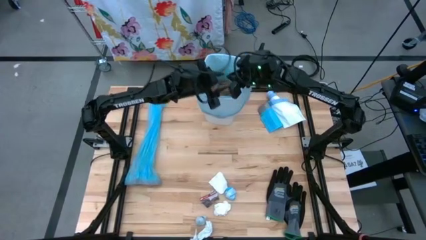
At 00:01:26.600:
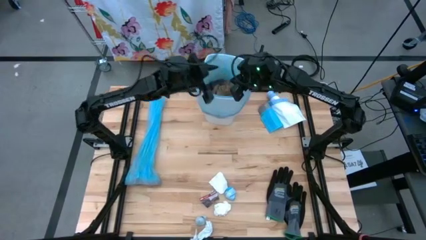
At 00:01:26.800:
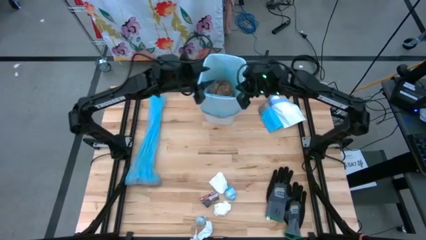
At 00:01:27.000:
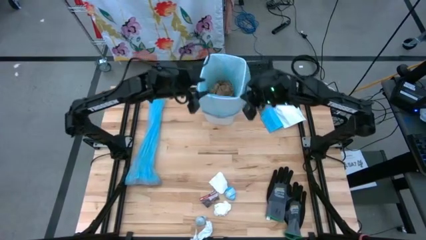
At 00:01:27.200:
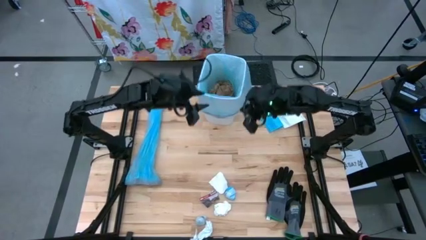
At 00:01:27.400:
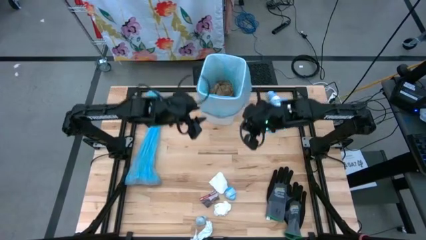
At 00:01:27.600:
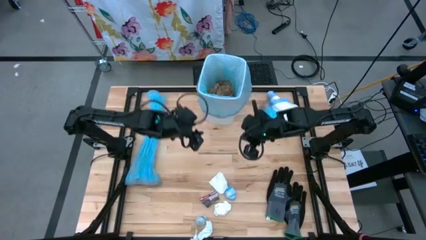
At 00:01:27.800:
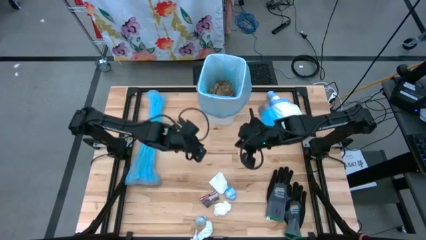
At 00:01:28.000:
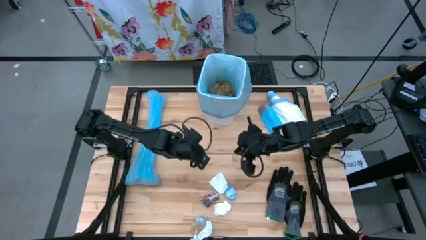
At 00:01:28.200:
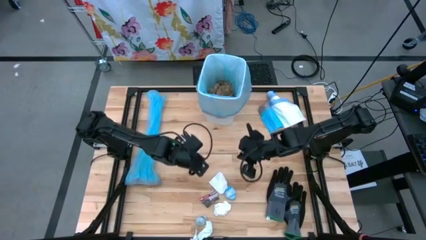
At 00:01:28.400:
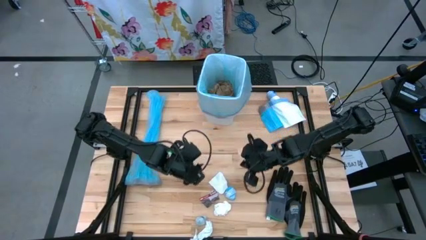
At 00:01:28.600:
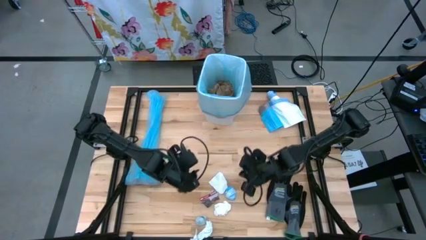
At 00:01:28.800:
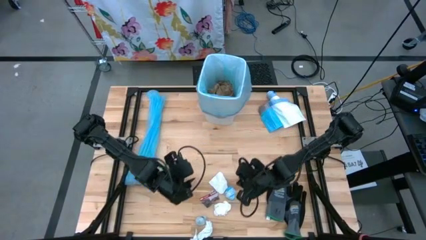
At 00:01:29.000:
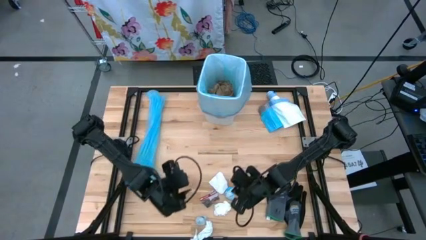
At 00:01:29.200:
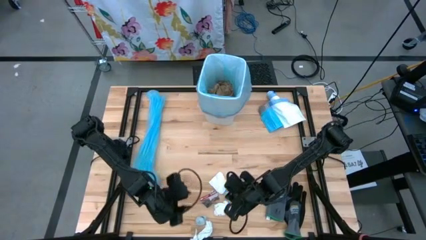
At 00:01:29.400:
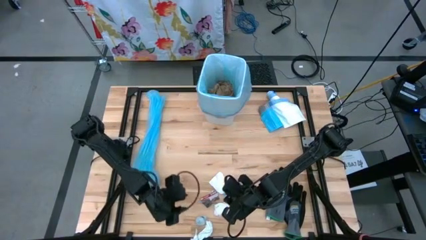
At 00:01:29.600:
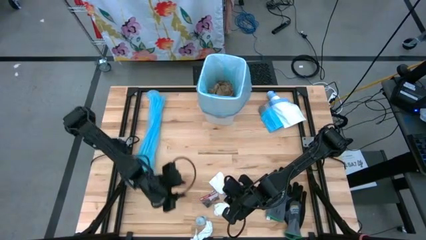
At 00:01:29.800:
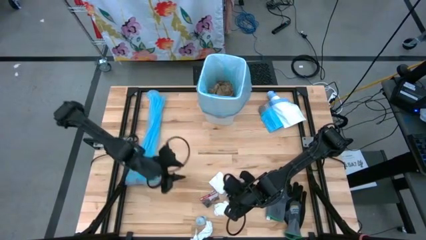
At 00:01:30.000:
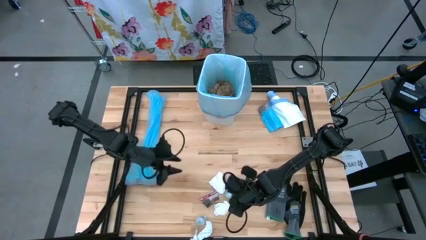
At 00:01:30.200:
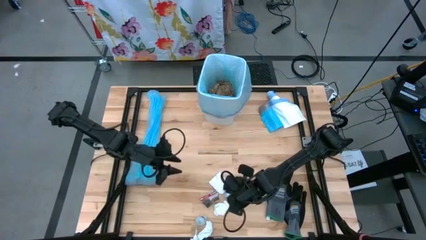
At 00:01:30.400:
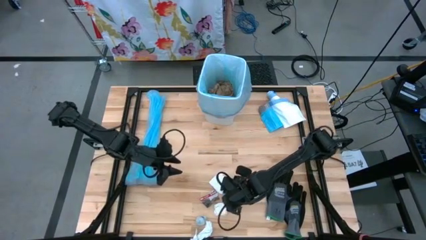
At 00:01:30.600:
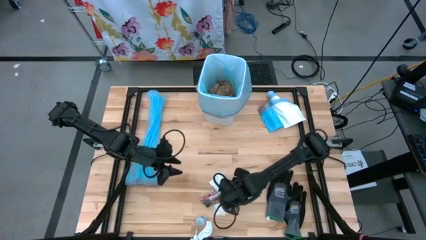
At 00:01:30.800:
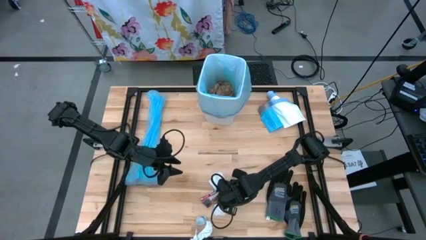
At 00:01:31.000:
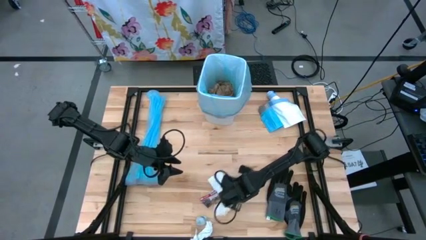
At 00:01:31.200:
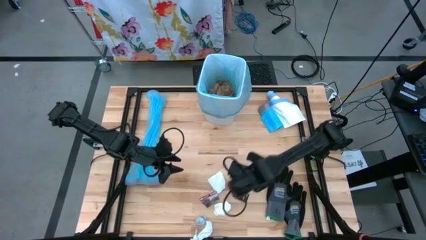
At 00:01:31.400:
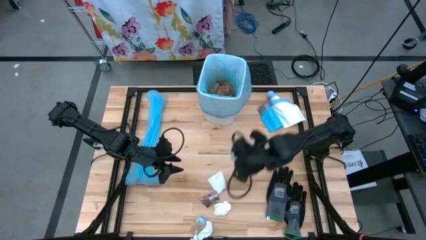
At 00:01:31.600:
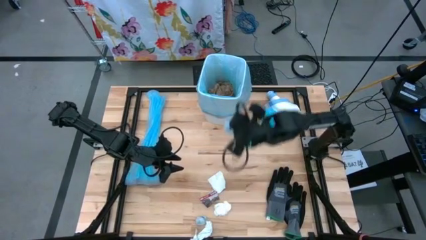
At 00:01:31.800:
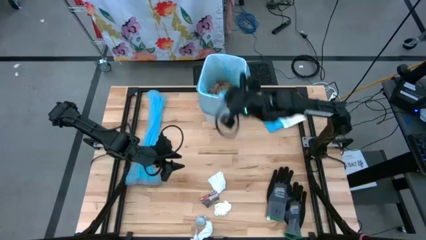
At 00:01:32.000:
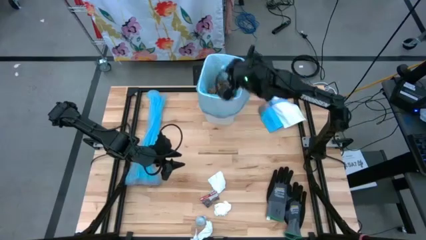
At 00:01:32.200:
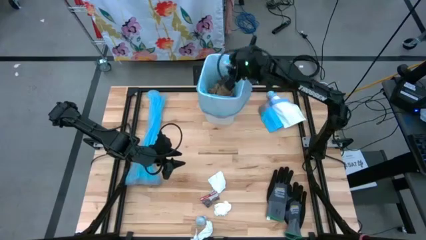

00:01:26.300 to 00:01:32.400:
Task: place trash/remove bag and relplace
Put the blue plastic into the blue trash bag inside the white trash bin

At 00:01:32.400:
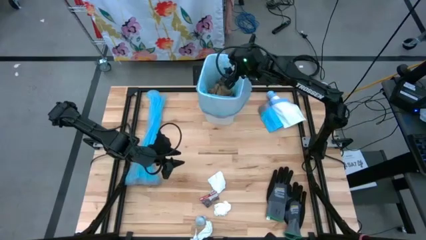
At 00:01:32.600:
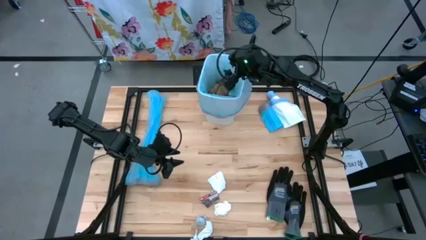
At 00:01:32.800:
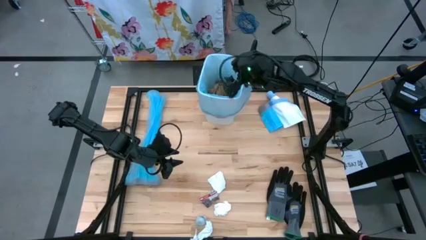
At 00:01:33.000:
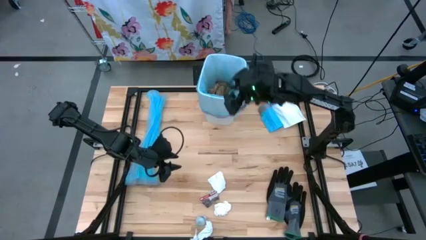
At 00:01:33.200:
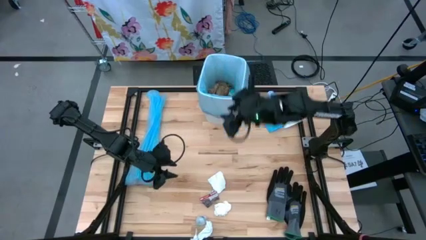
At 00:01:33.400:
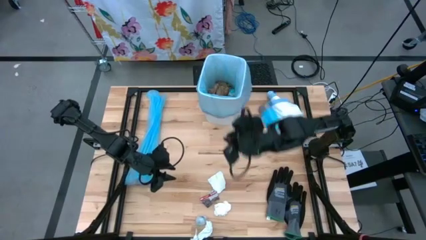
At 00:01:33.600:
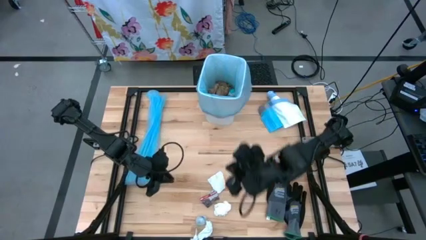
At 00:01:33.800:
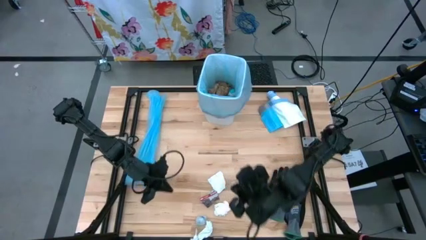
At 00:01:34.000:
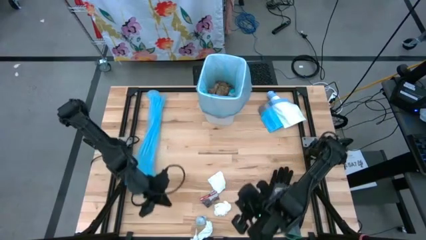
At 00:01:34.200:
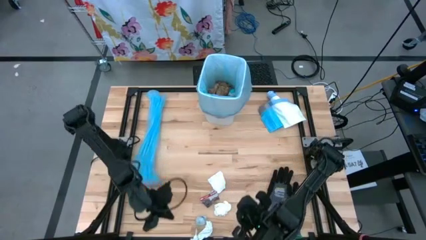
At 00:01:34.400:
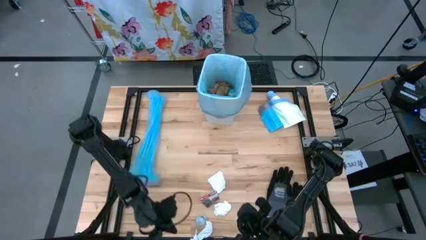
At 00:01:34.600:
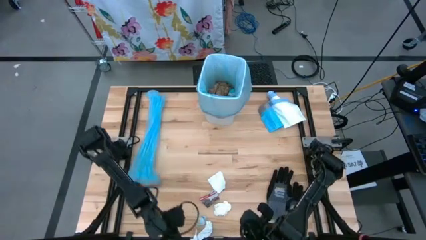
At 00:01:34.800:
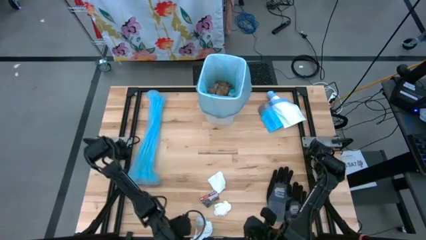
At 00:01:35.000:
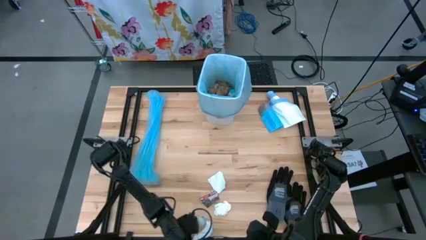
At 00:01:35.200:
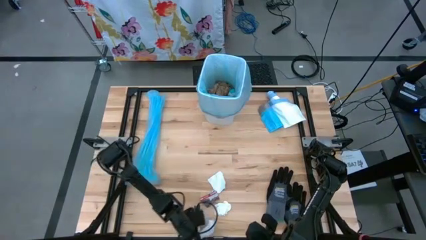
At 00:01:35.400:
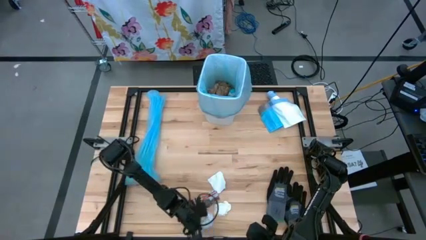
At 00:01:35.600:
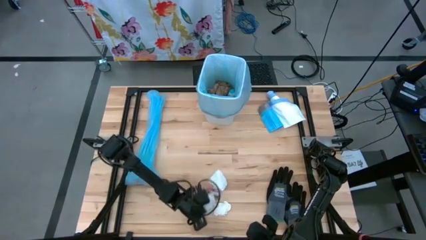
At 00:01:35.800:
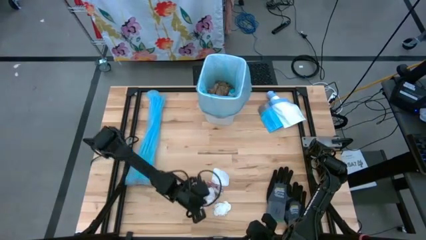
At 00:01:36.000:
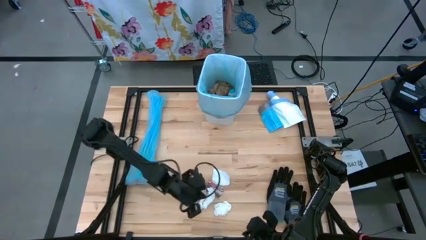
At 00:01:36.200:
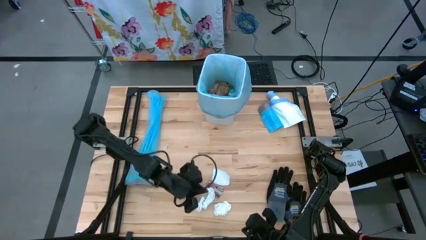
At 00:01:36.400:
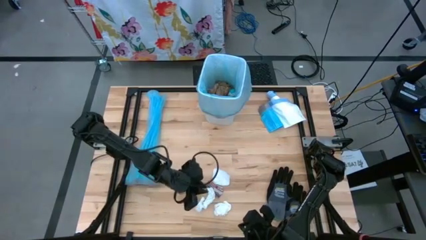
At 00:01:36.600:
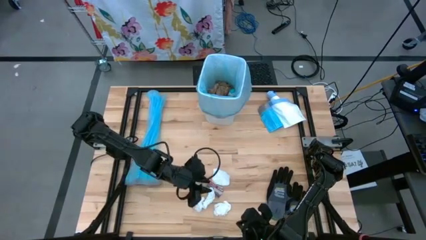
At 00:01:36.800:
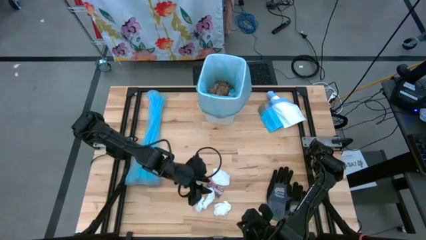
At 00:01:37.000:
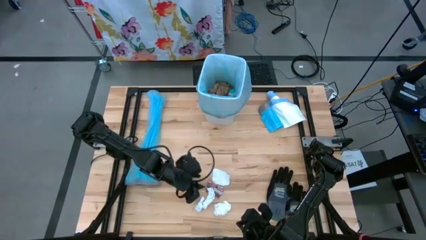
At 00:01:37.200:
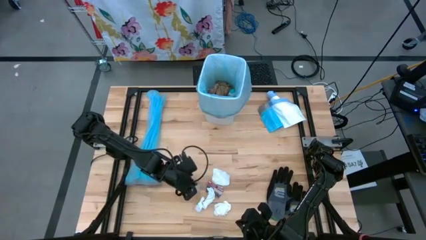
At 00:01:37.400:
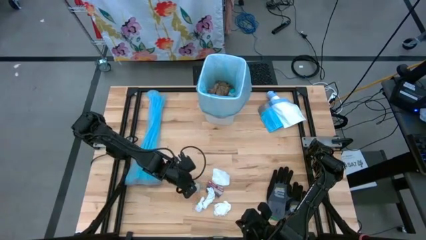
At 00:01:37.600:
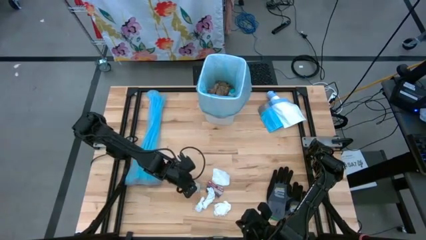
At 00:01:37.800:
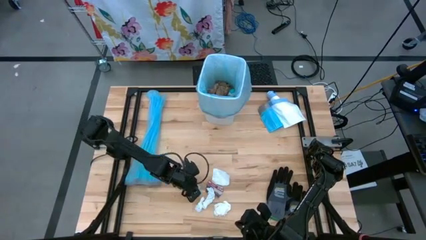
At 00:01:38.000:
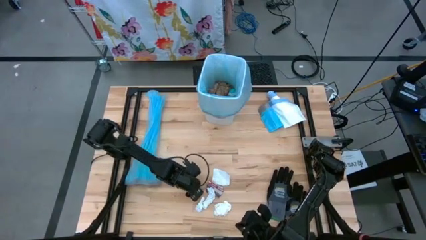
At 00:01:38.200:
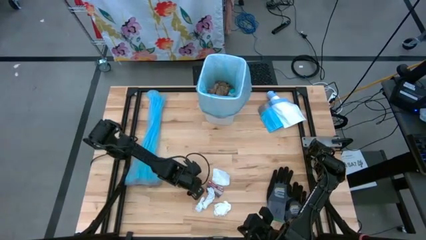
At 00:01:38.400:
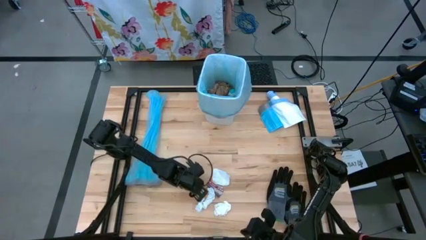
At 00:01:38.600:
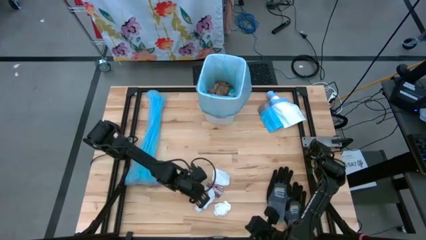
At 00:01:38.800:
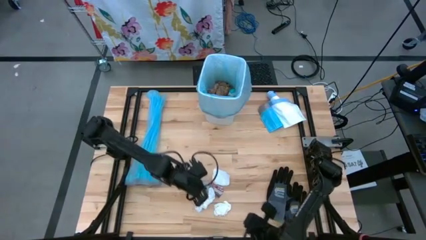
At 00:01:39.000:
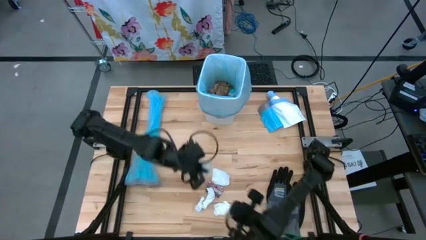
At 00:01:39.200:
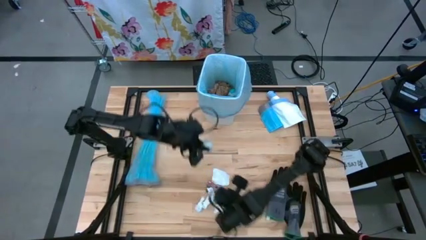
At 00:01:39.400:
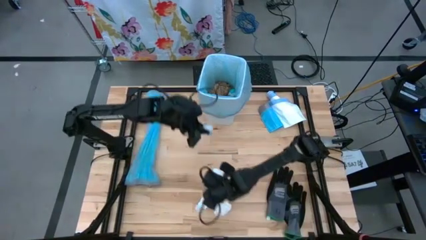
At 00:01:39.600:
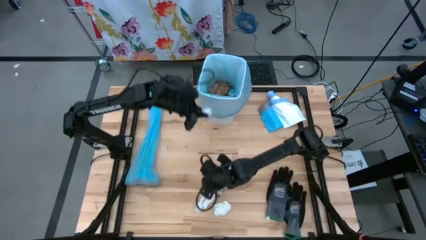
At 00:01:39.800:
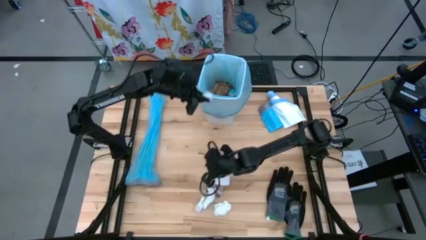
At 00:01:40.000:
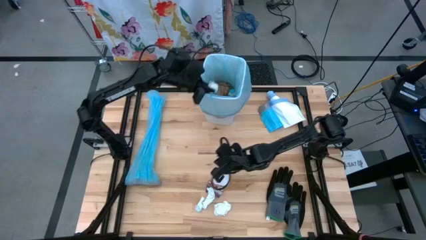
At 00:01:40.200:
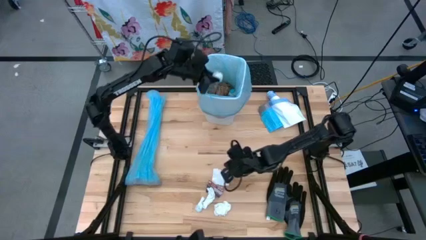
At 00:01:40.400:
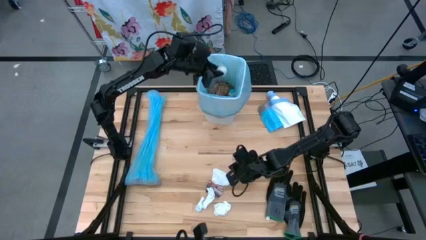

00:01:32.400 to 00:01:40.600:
Put the white plastic into the blue trash bag inside the white trash bin

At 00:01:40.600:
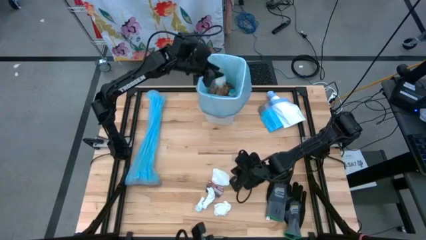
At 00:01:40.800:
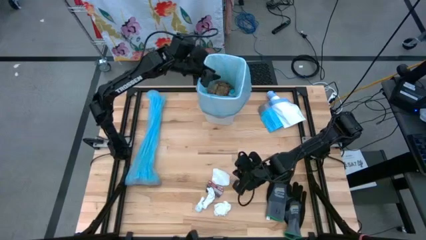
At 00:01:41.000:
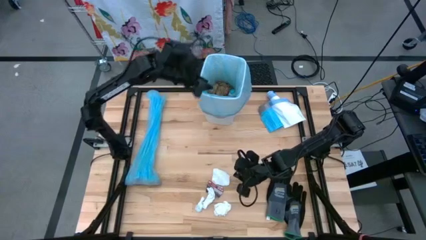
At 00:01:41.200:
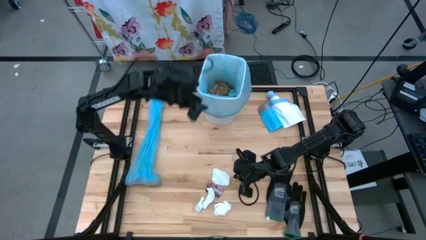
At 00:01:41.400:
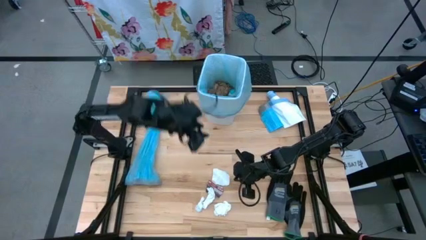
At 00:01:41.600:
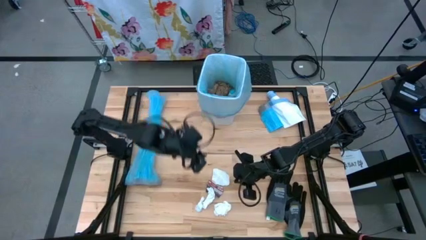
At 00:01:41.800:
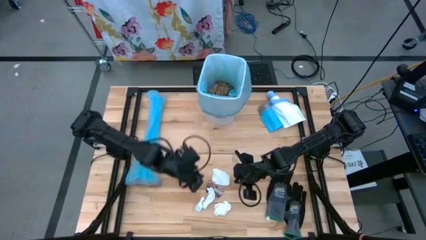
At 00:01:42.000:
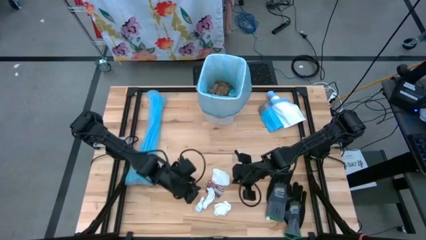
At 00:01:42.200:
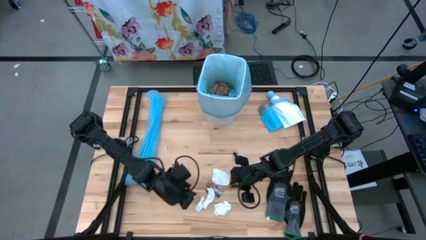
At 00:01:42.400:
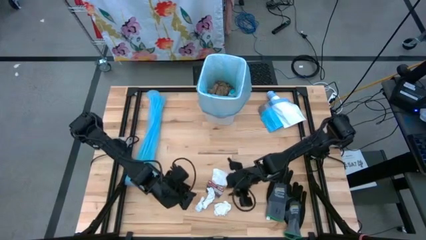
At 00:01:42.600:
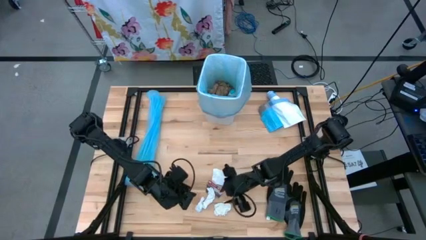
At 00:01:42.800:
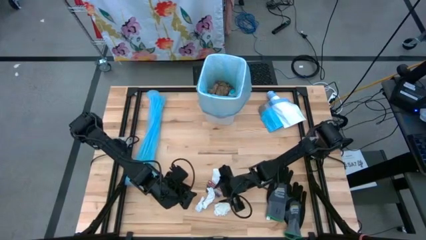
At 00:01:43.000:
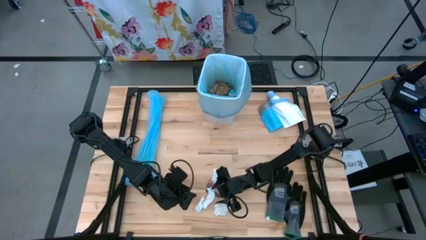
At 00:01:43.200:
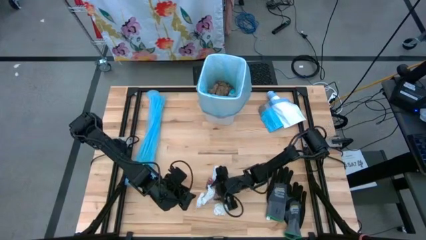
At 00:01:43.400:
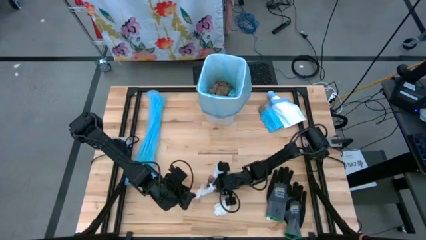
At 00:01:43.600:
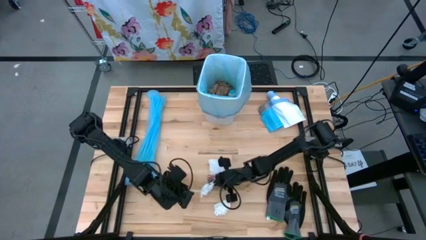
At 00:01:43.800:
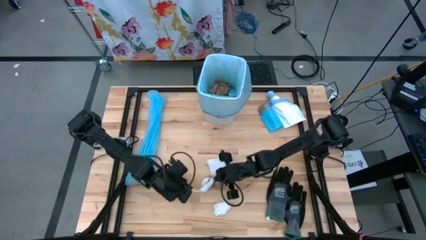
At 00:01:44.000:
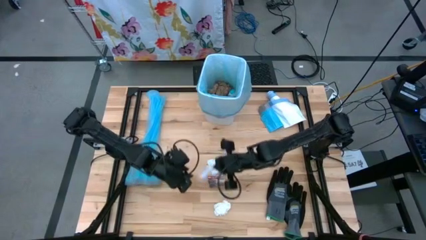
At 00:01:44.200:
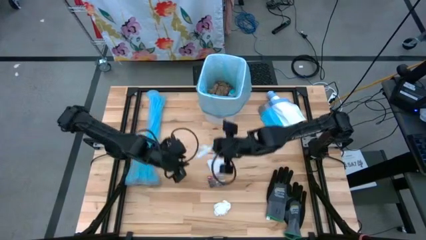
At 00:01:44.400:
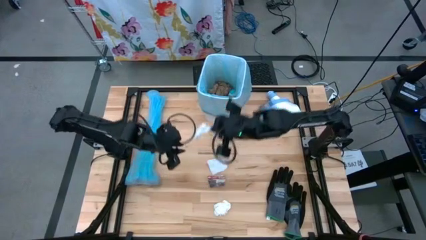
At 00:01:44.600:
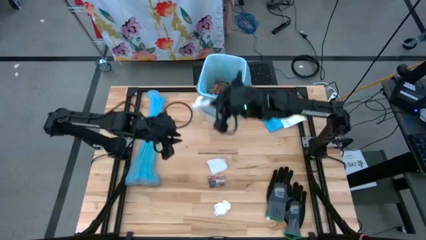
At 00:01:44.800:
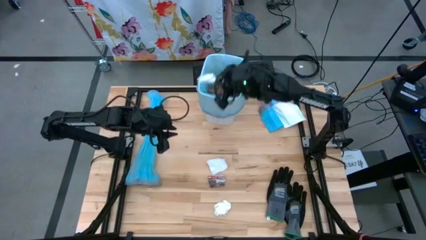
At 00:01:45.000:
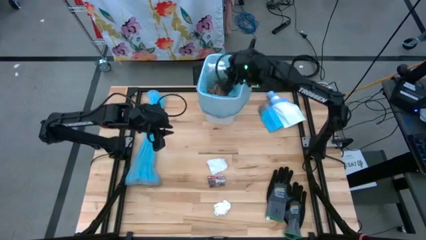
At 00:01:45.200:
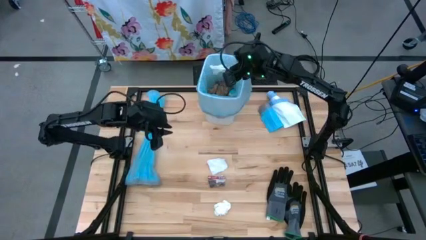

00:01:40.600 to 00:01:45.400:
Put the white paper into the blue trash bag inside the white trash bin
